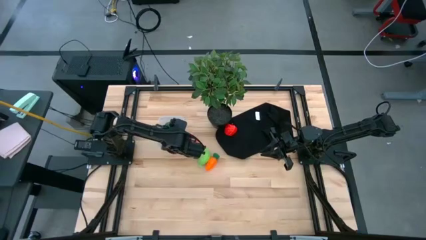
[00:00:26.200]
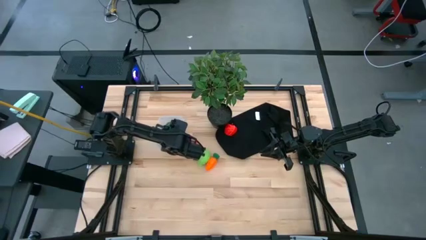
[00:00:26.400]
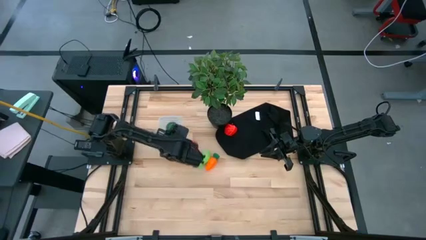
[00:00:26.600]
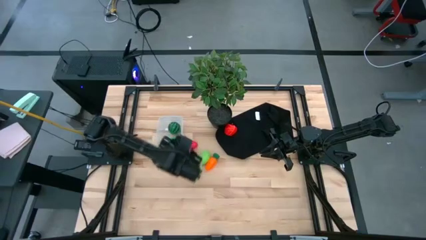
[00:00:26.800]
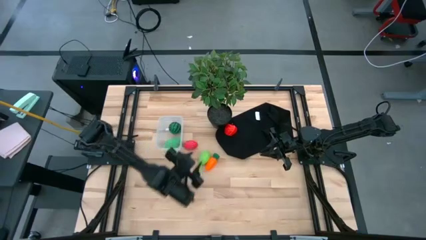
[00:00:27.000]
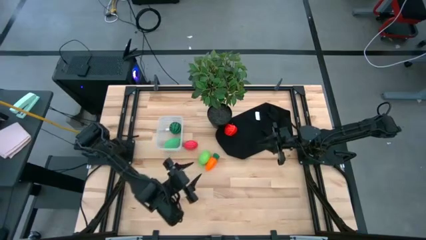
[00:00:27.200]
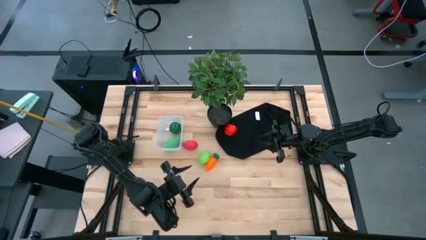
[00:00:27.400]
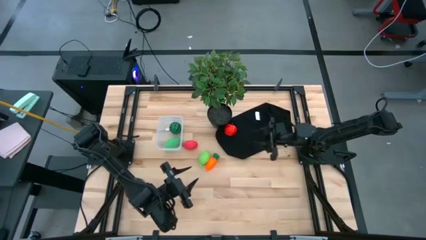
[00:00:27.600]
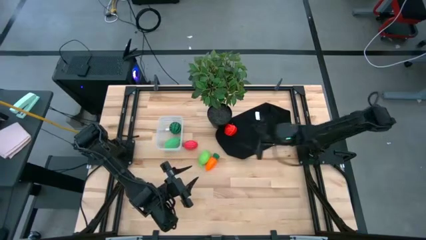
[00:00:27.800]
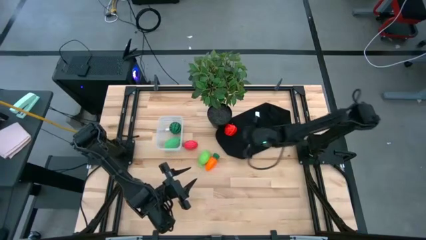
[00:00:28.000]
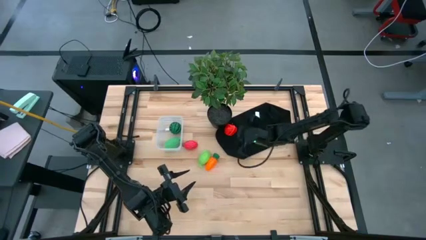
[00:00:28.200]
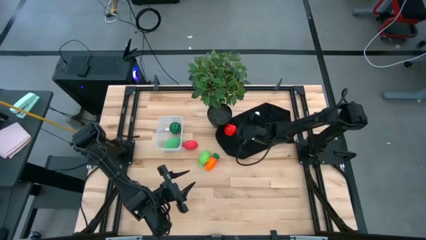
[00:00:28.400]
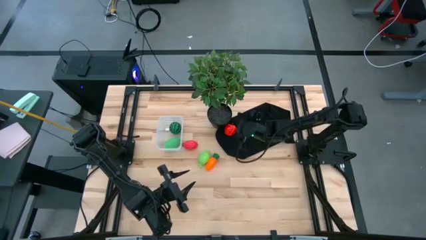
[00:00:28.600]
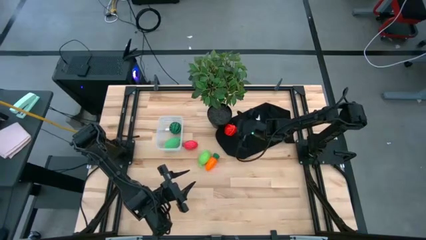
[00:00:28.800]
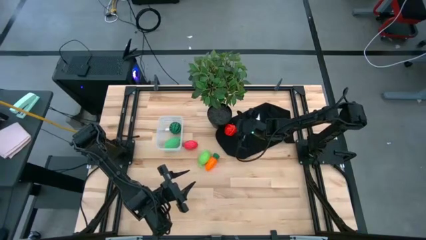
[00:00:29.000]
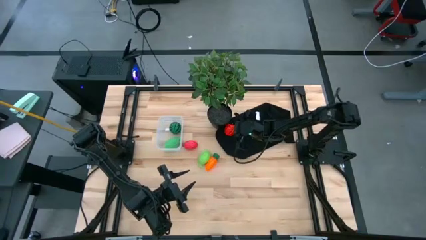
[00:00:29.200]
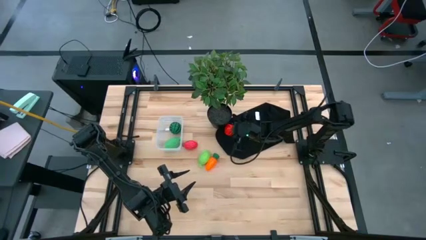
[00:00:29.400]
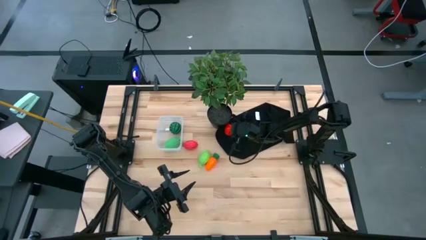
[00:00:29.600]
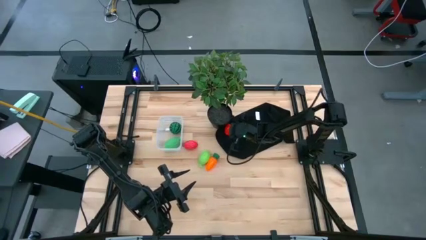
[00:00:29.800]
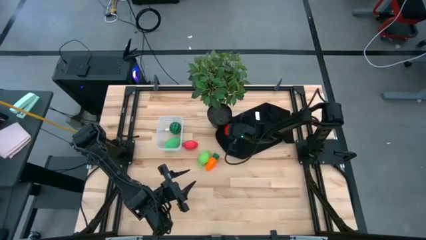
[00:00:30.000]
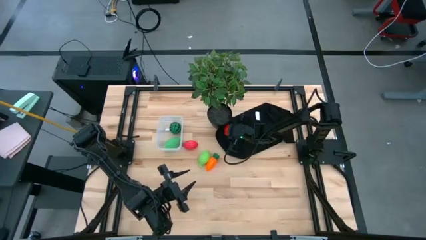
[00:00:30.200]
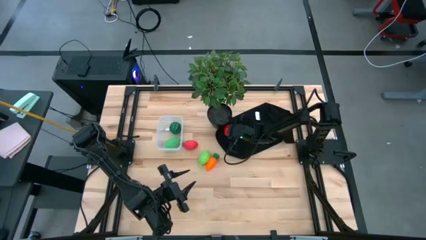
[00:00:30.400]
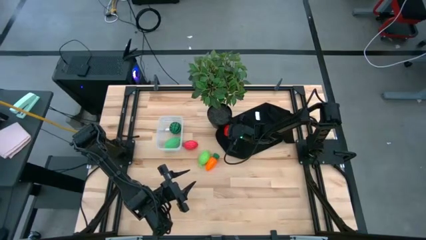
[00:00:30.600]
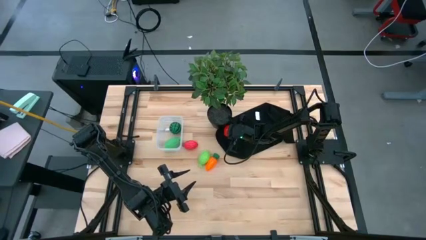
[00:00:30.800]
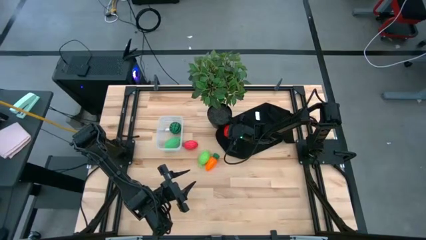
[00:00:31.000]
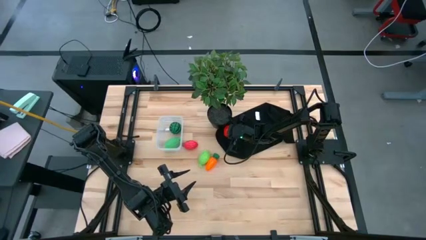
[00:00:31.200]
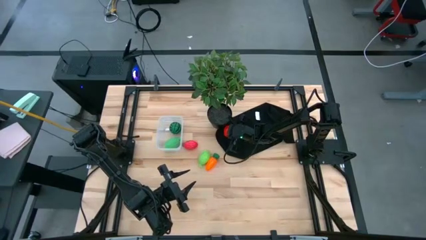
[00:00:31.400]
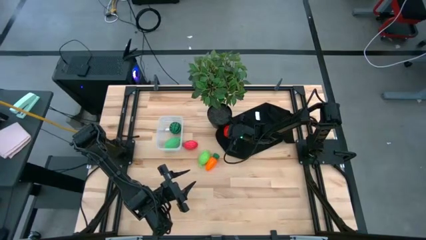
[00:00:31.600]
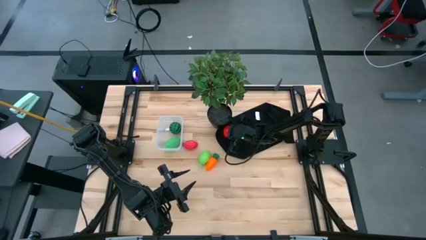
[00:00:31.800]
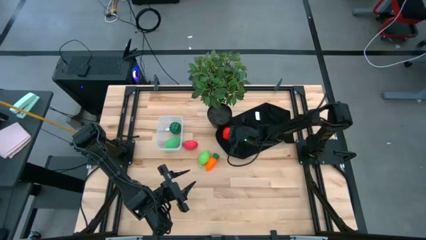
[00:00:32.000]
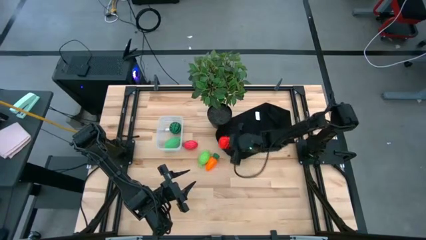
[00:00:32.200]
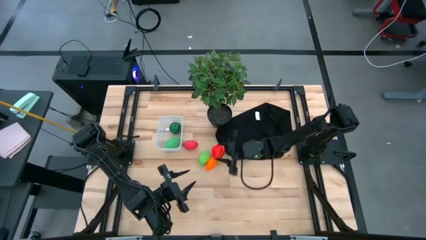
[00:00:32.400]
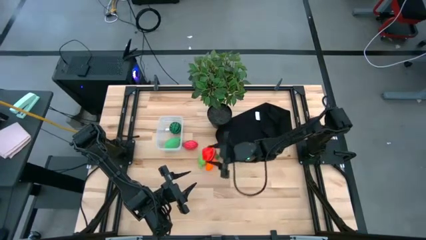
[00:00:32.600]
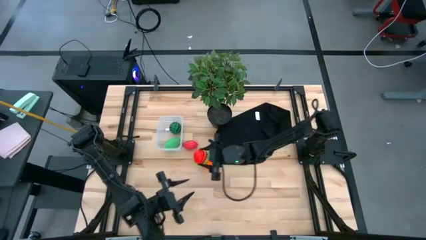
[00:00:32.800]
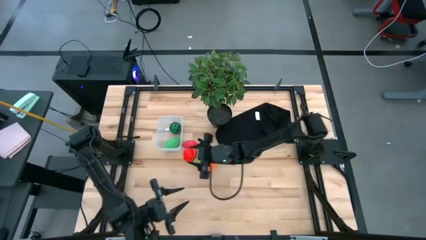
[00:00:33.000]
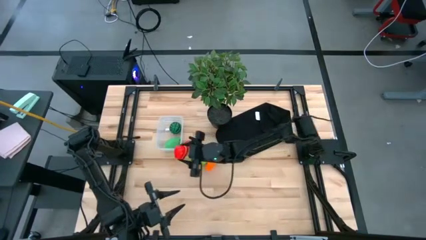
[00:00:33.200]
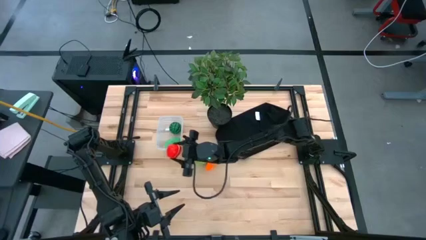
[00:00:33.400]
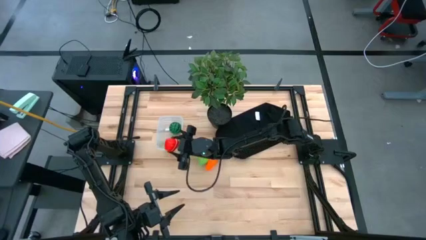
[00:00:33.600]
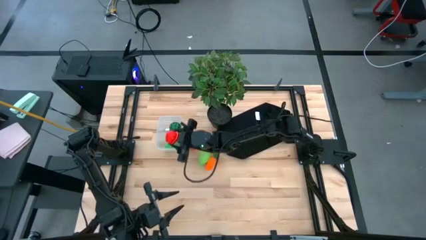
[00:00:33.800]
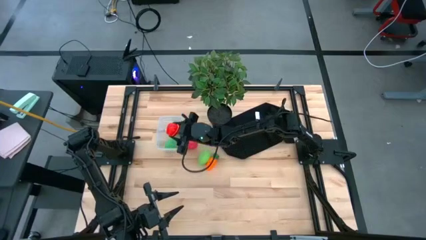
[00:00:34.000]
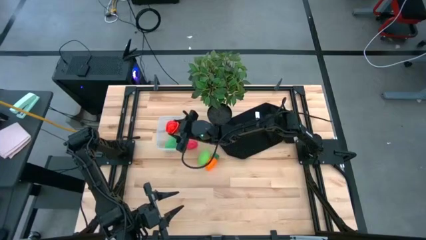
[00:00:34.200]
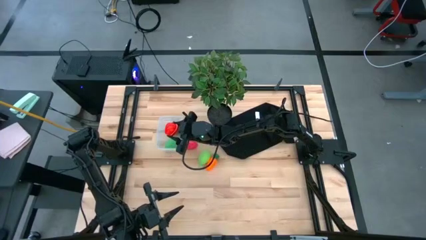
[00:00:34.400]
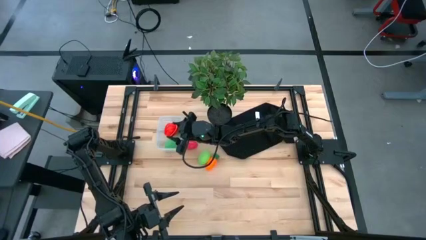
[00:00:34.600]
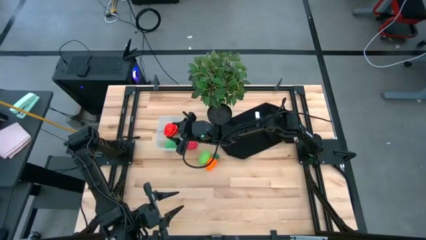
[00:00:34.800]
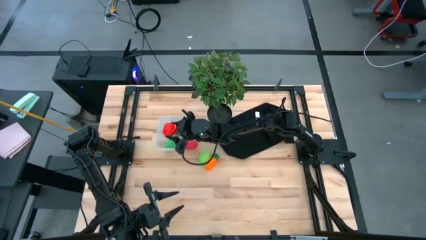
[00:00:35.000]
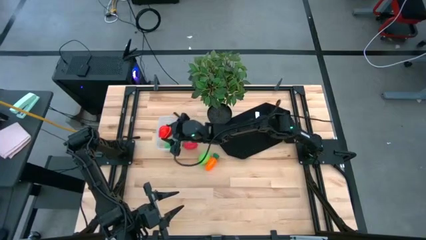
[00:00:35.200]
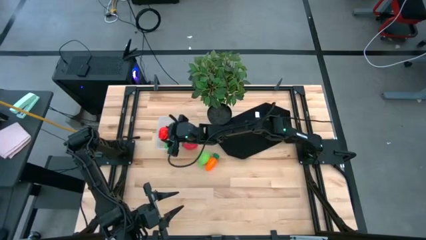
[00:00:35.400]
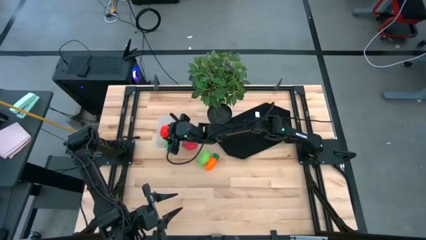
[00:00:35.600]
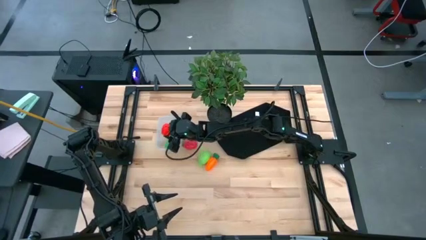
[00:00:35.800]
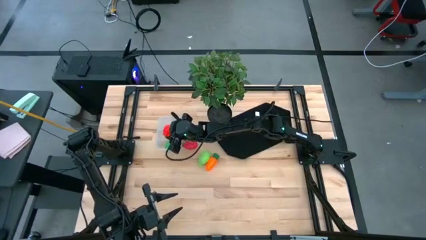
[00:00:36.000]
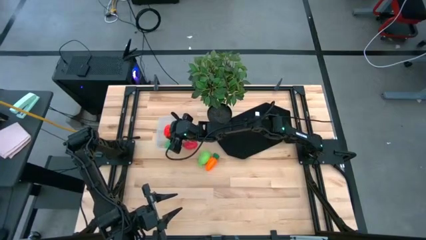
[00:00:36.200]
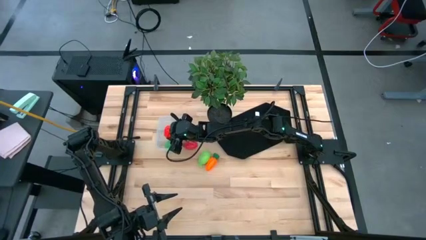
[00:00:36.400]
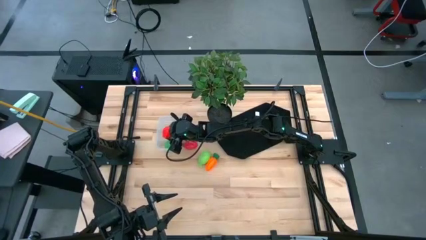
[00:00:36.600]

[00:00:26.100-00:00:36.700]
Task: Pick and placing Produce into tupperware
Put the apple into the bin

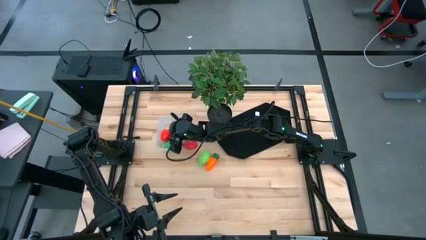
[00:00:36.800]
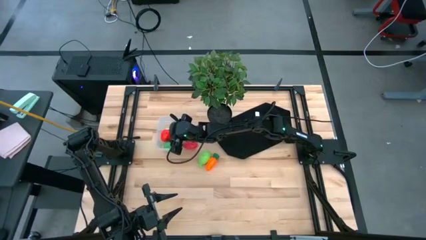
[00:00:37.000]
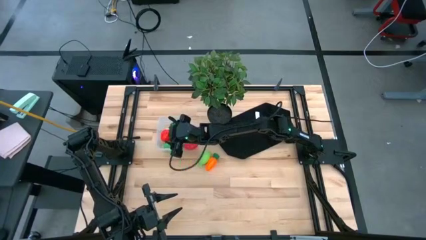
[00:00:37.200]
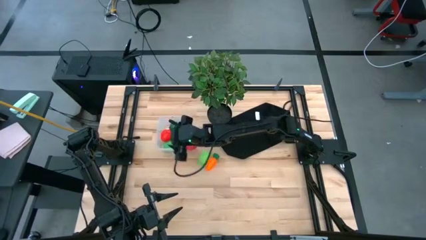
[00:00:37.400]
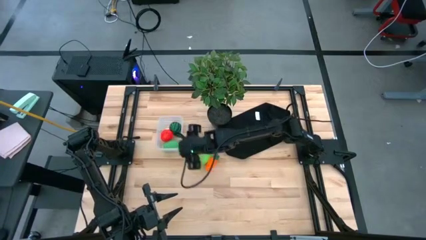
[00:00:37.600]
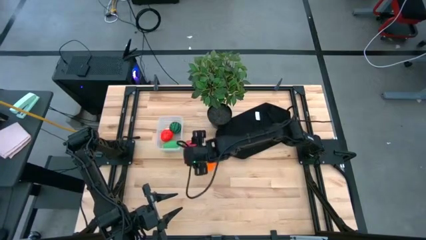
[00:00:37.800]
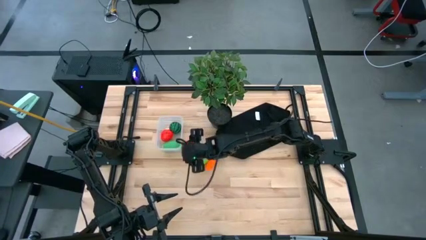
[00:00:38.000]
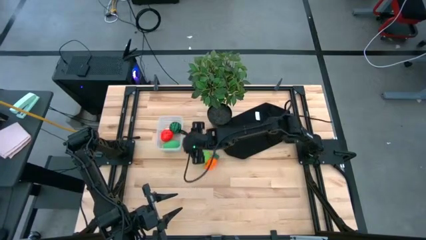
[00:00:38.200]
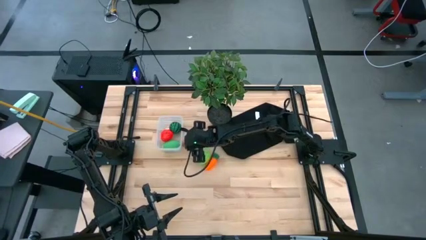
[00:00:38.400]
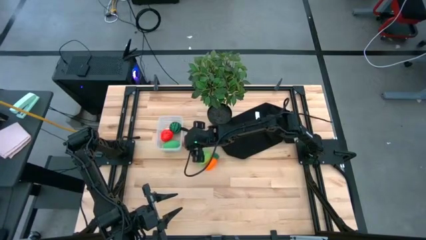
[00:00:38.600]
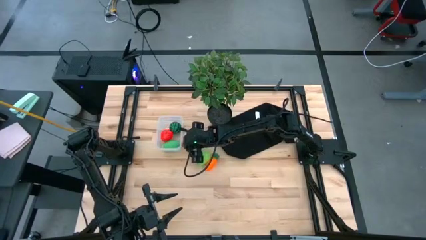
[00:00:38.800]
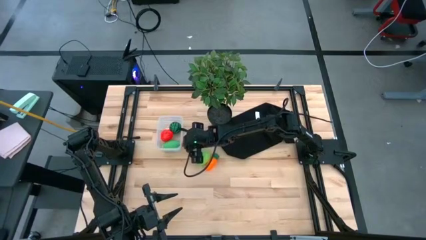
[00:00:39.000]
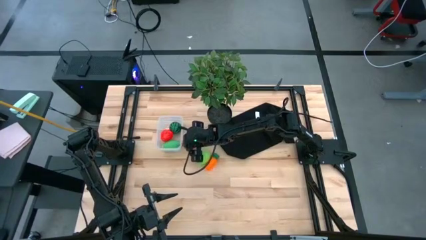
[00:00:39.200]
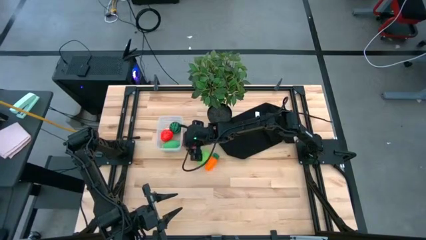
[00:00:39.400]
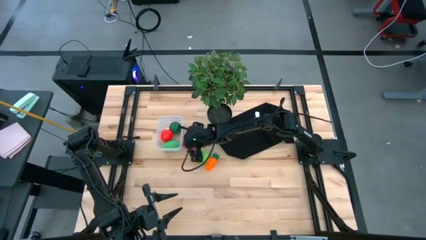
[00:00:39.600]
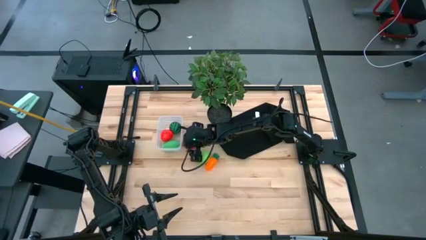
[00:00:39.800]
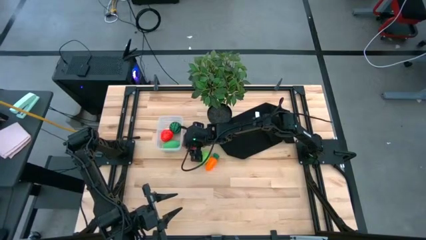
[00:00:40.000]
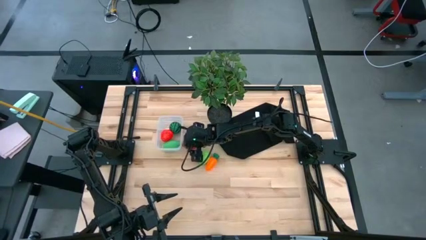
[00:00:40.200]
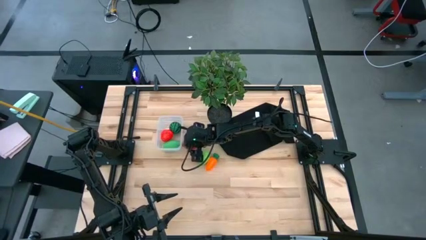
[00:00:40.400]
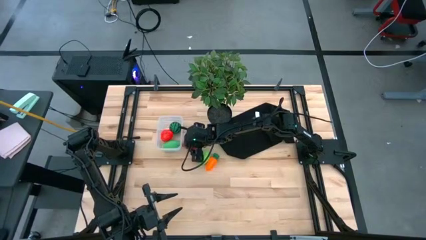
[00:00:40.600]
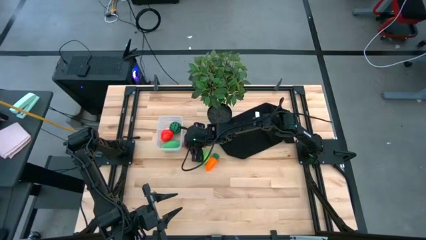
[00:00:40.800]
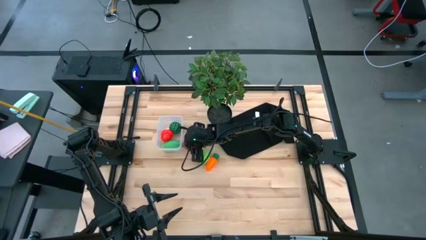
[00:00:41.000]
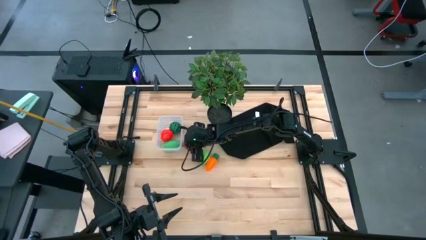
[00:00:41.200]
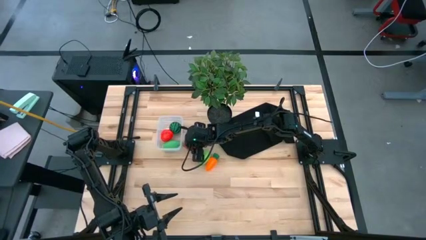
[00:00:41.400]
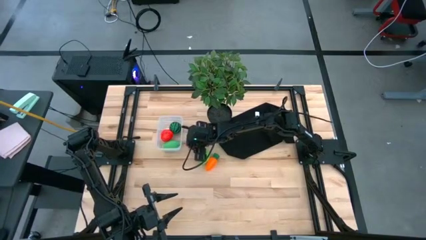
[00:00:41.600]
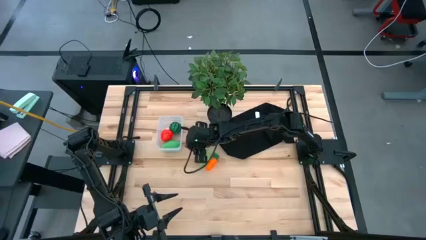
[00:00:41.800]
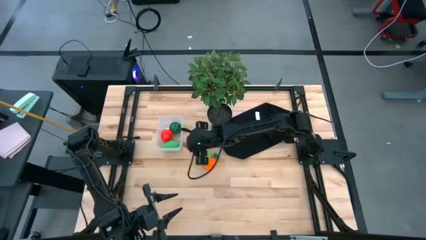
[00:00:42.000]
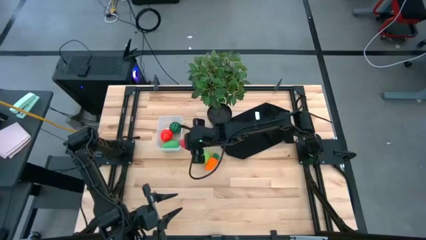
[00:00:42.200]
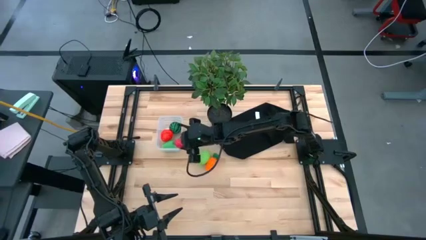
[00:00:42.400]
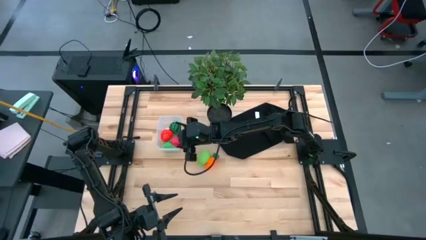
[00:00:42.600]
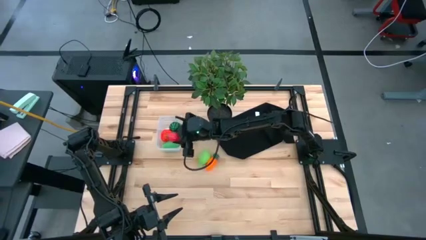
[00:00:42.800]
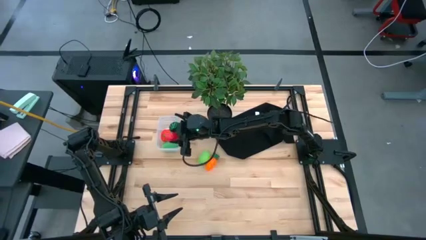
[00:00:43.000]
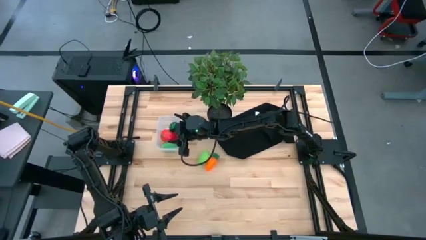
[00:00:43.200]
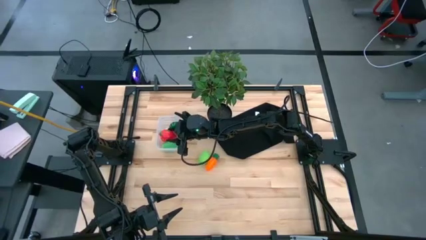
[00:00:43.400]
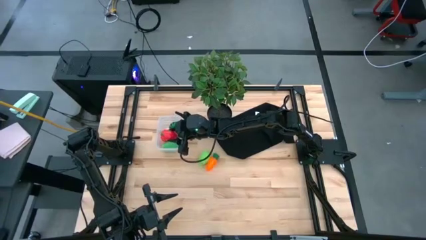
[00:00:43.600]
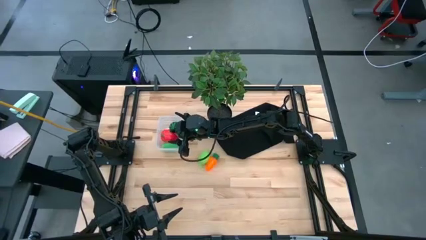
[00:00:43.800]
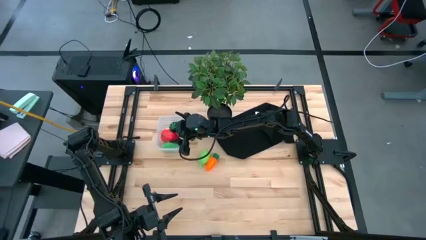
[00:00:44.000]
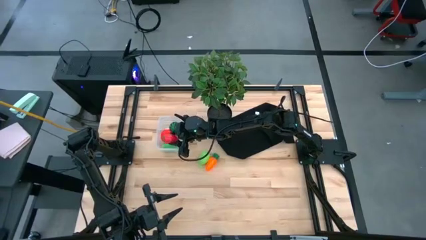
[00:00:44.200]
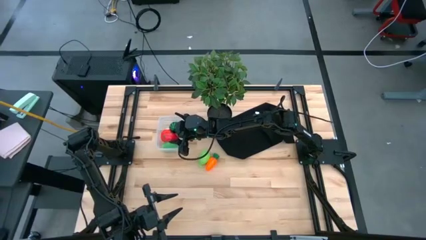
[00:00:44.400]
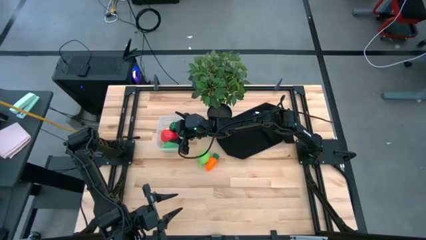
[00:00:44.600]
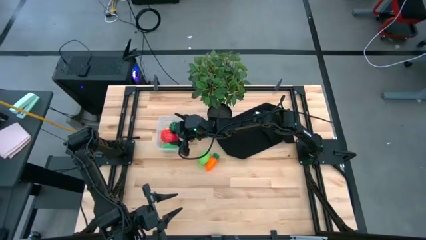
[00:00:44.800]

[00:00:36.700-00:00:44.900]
Put the dragon fruit into the bin
